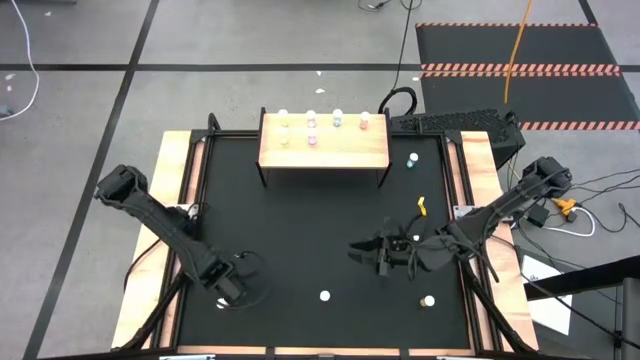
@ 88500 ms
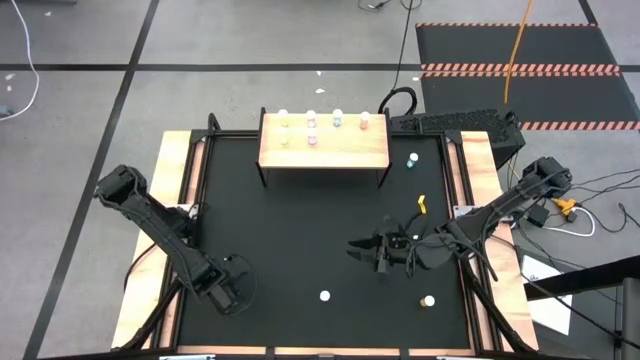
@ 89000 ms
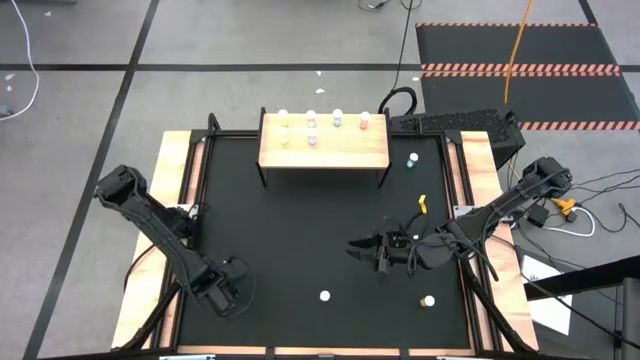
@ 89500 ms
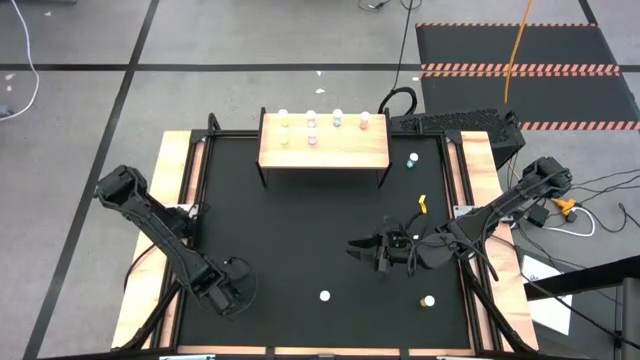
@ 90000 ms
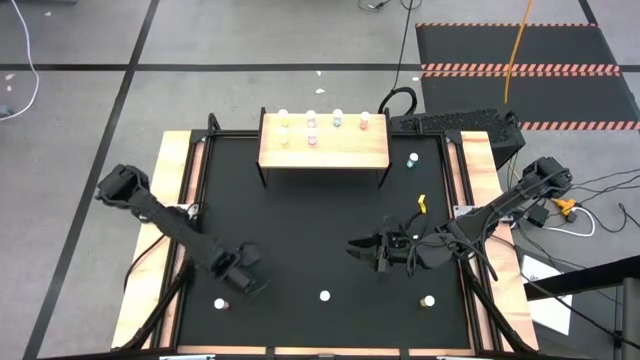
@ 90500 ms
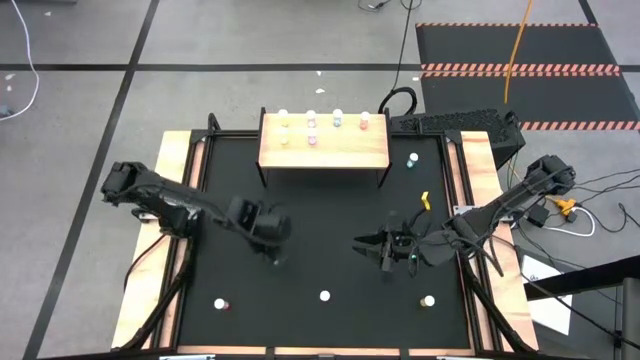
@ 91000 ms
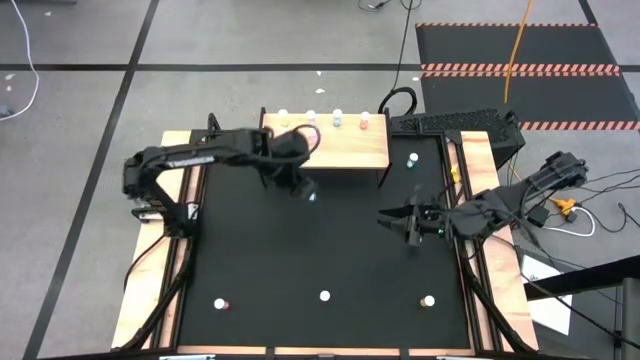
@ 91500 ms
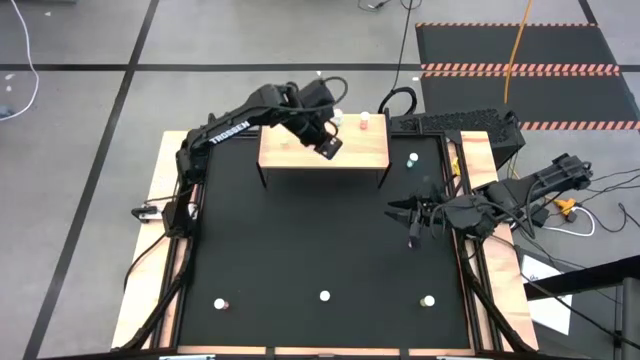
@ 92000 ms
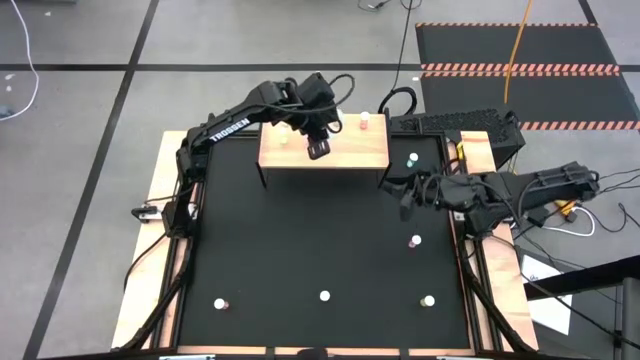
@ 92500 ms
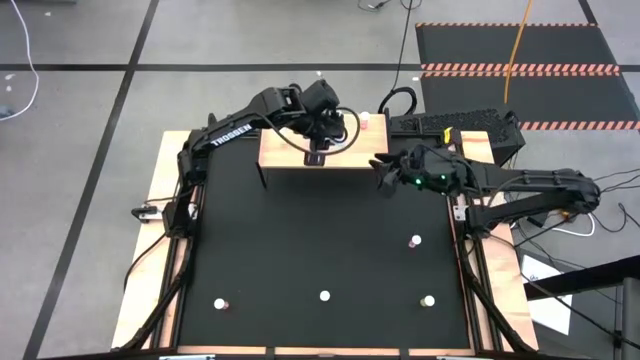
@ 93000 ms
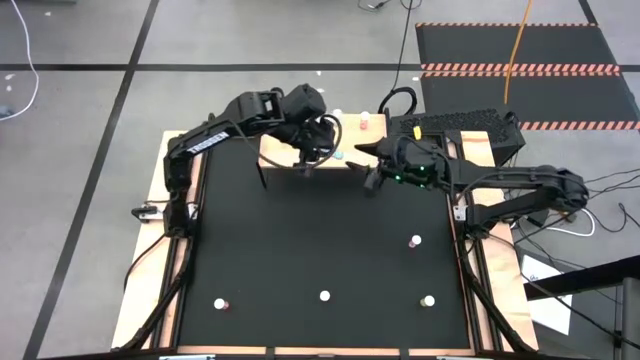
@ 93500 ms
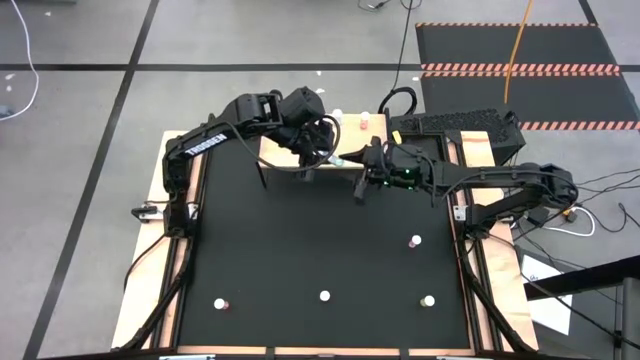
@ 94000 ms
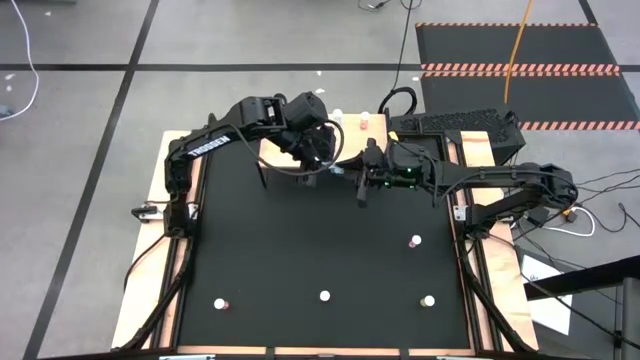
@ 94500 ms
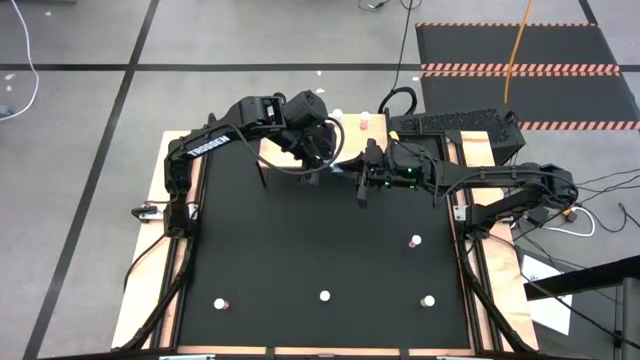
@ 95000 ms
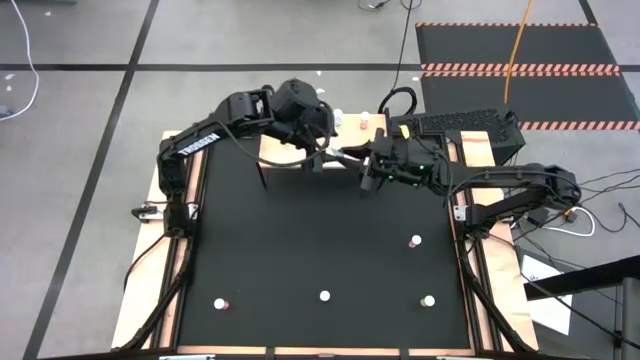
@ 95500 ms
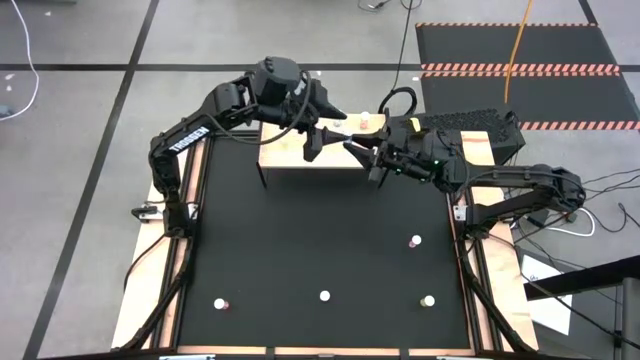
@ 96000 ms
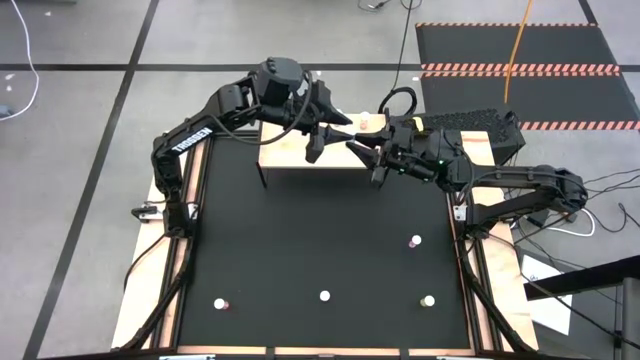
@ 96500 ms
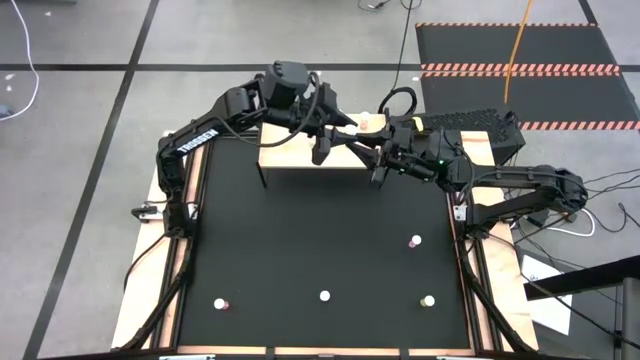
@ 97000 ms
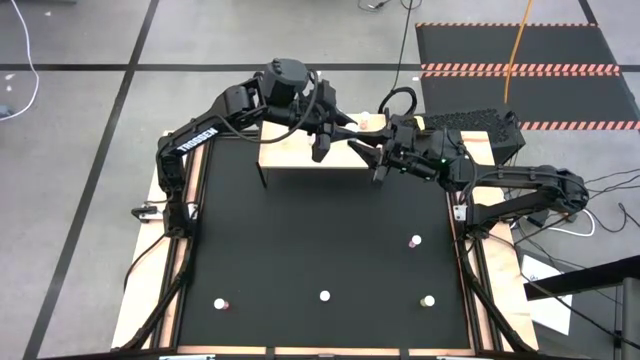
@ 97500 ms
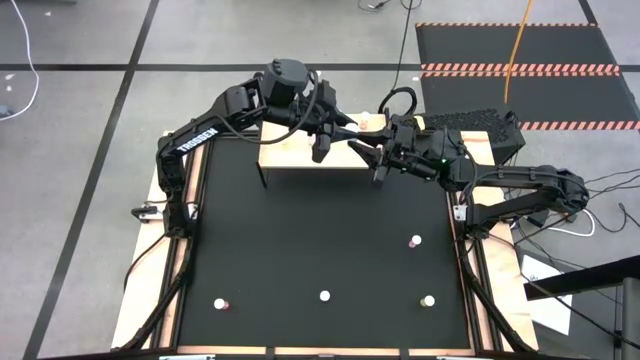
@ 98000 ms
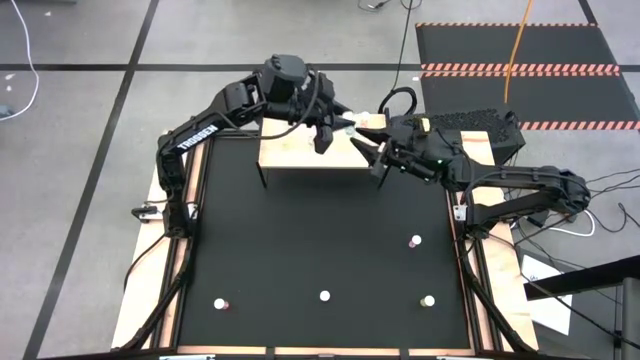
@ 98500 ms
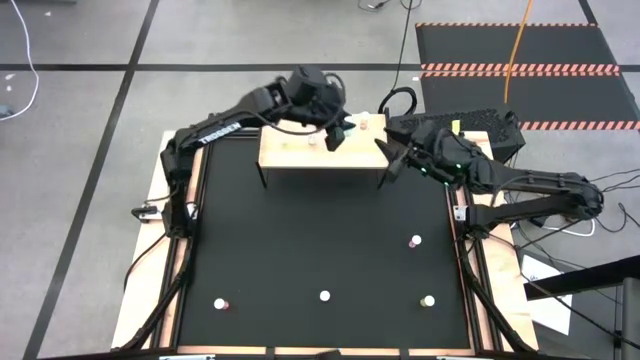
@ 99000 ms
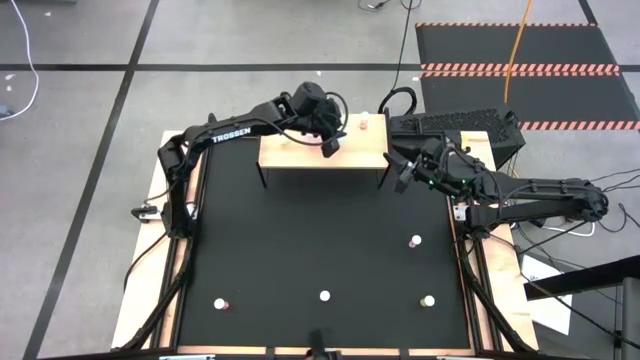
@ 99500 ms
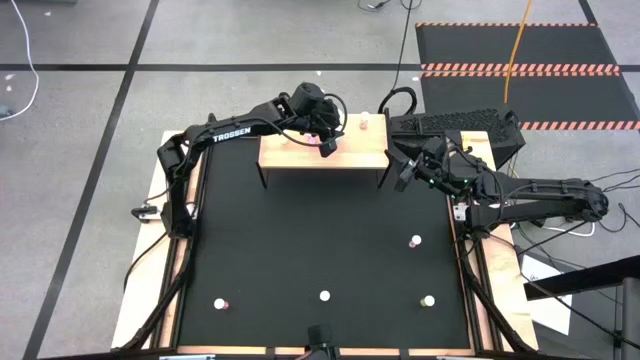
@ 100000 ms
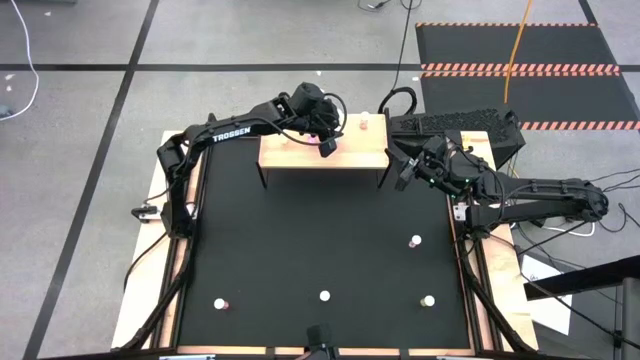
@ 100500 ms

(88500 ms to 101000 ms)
Task: Pick and place medicine bottles onto shelf by color
Put the bottom blue pill bottle on the shelf aligned with the other blue pill bottle

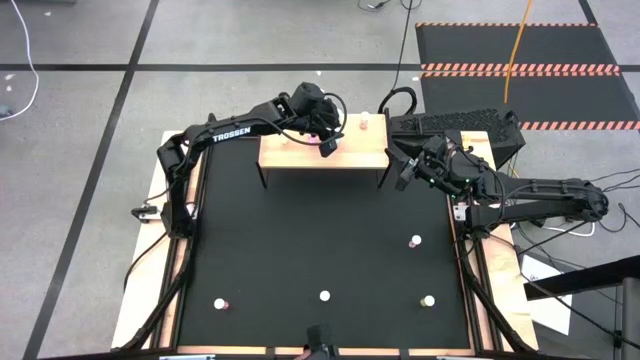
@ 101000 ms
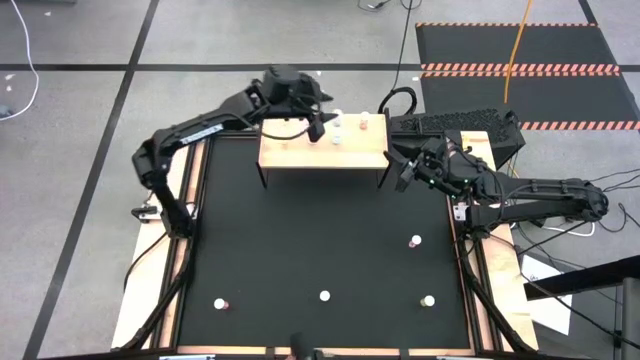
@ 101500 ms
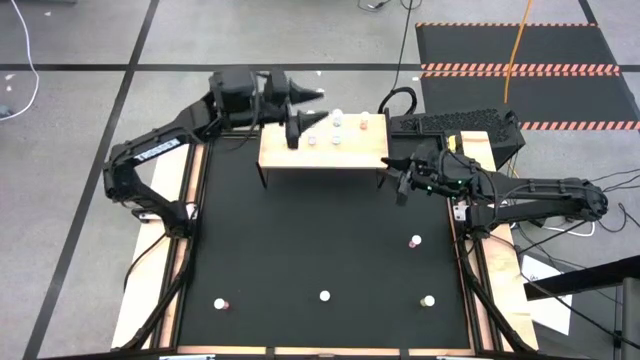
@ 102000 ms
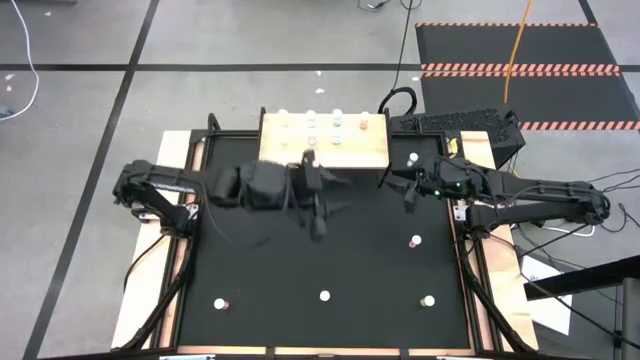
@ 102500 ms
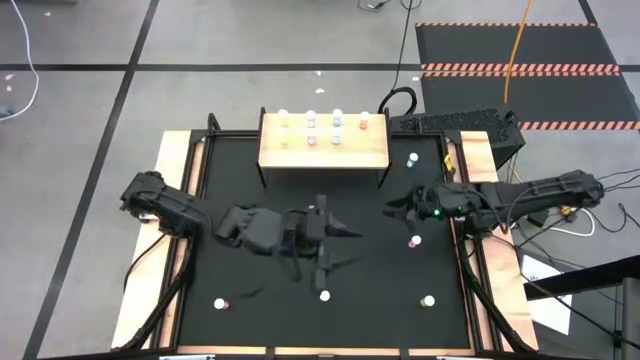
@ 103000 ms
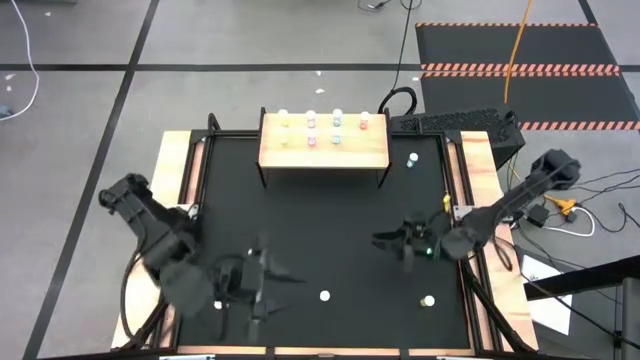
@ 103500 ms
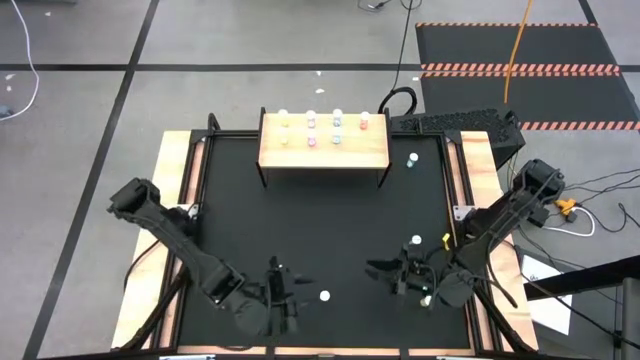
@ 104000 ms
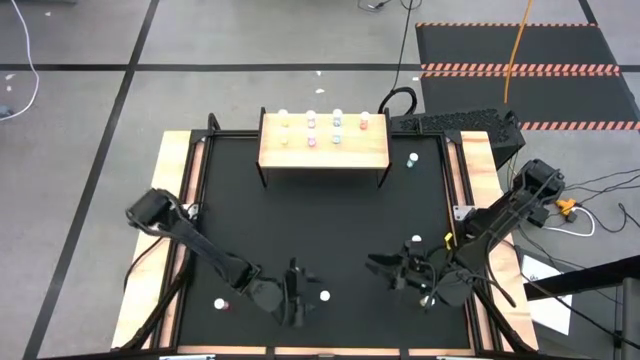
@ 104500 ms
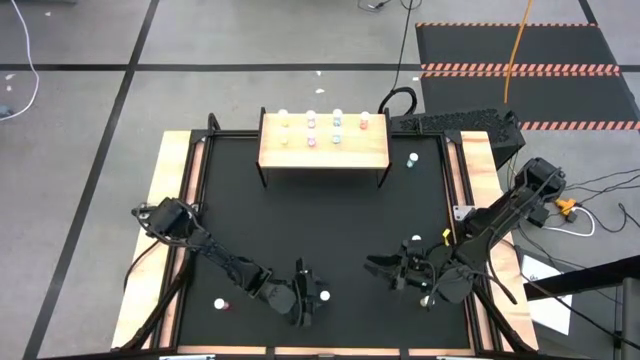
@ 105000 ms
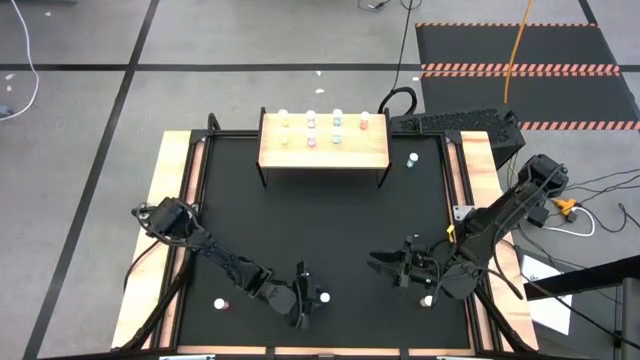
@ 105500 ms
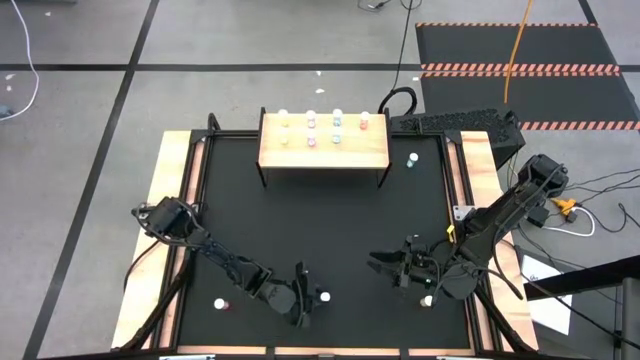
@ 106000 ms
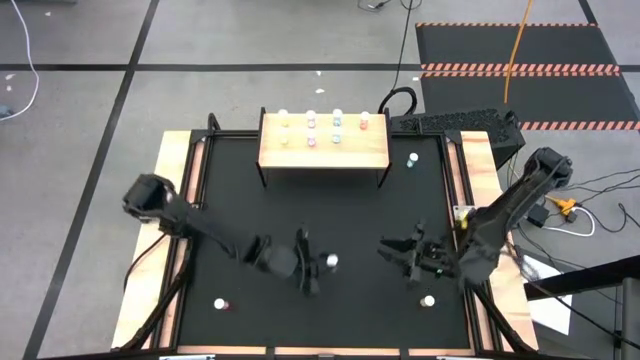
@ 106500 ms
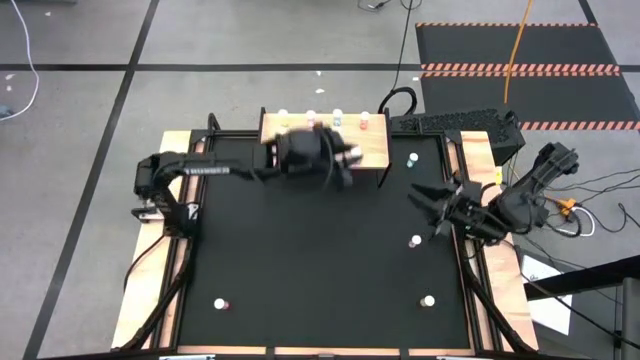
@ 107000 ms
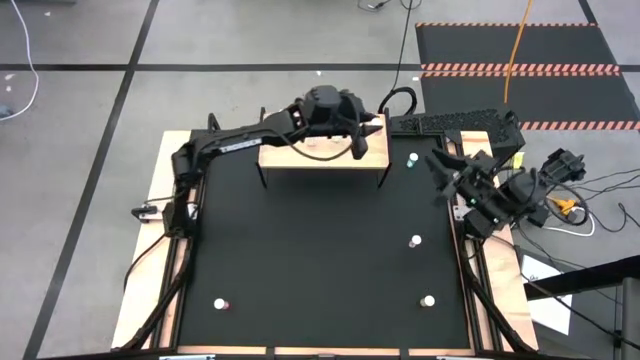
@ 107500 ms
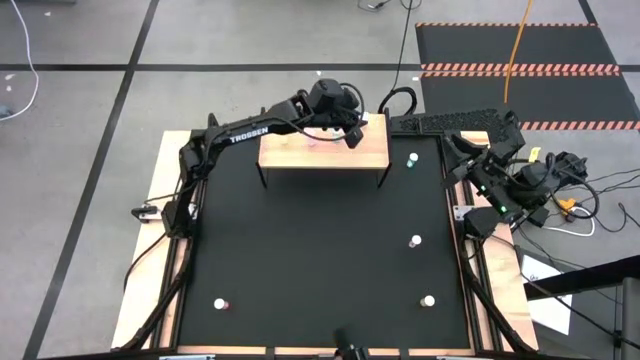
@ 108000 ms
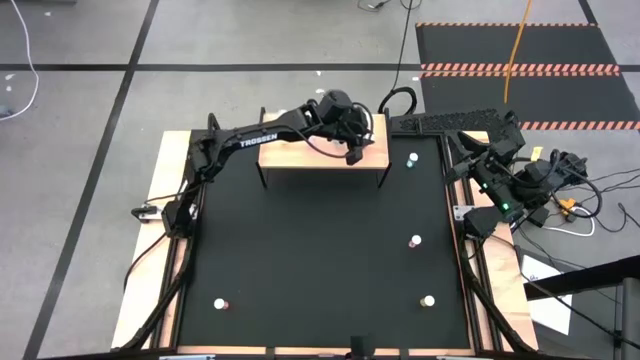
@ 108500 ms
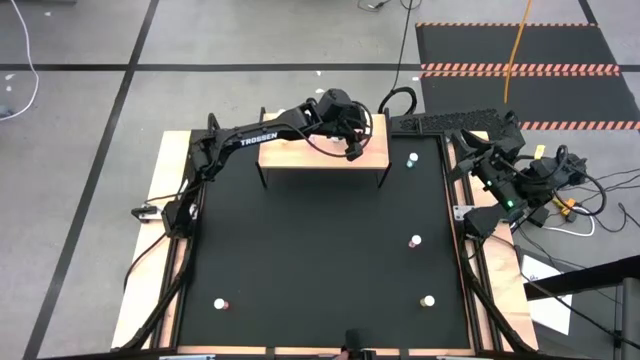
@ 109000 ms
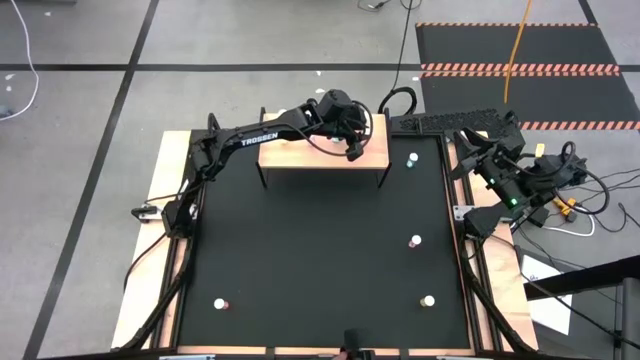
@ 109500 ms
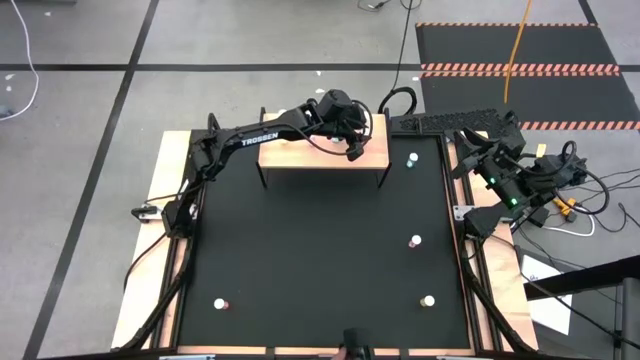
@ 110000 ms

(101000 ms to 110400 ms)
Put the right orange pill bottle on the shelf aligned with the other orange pill bottle
